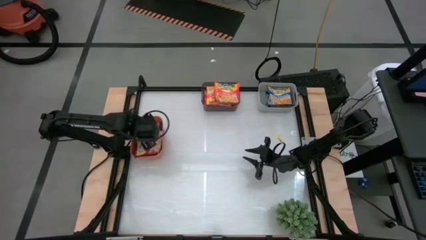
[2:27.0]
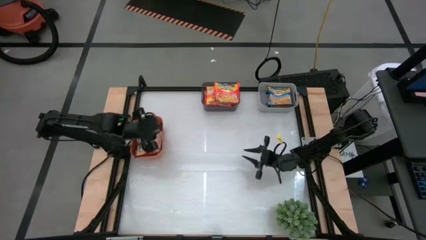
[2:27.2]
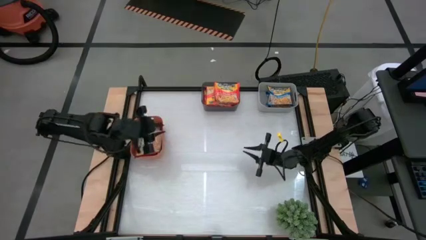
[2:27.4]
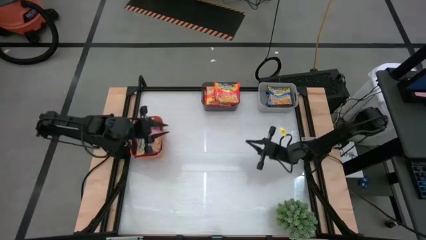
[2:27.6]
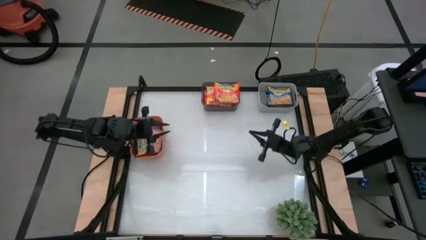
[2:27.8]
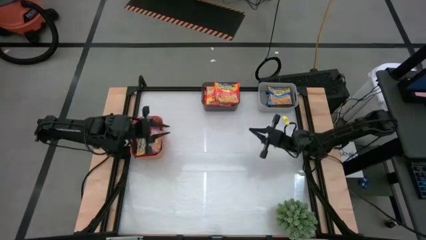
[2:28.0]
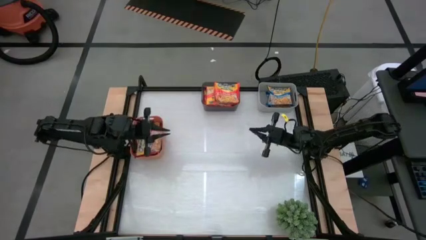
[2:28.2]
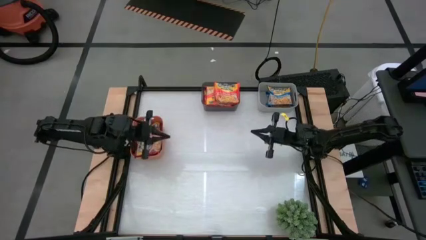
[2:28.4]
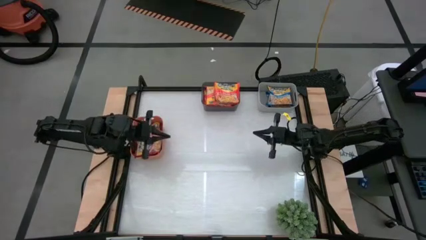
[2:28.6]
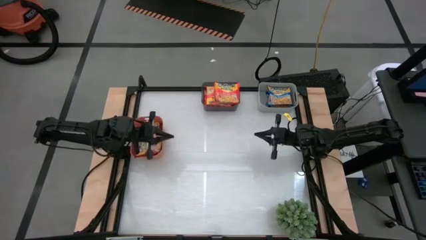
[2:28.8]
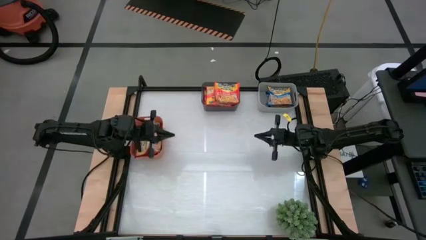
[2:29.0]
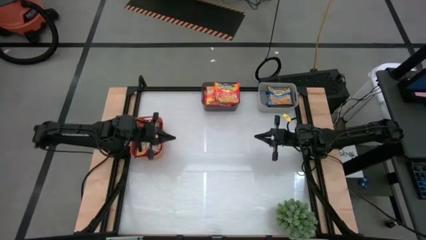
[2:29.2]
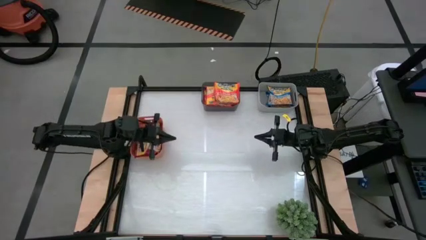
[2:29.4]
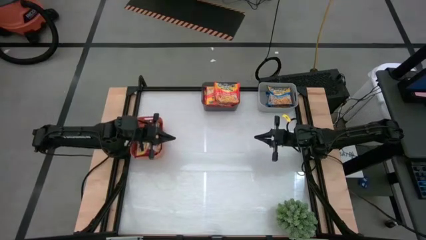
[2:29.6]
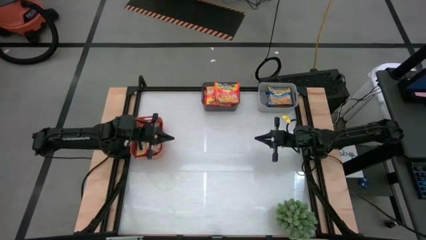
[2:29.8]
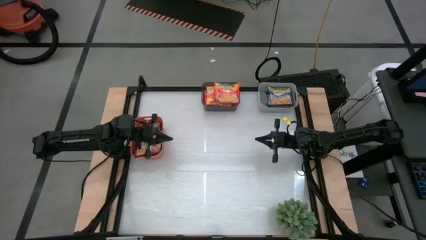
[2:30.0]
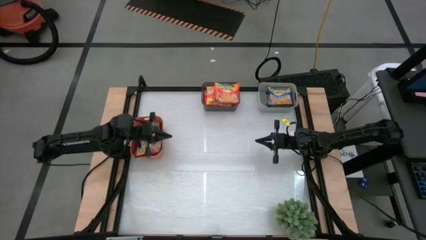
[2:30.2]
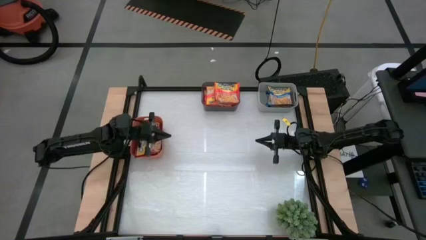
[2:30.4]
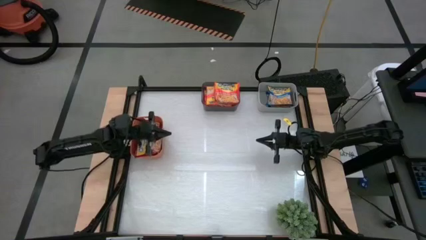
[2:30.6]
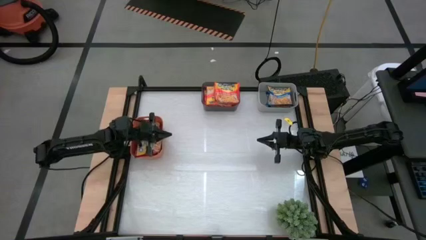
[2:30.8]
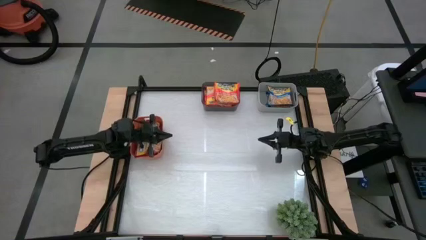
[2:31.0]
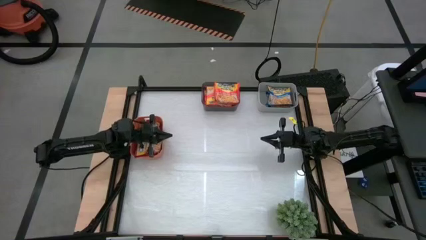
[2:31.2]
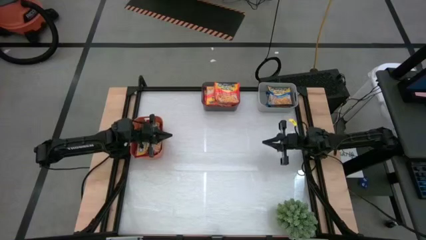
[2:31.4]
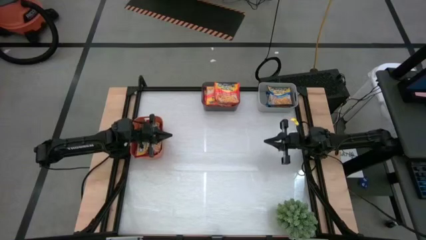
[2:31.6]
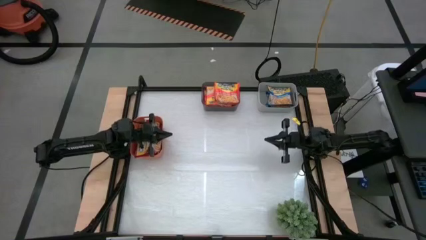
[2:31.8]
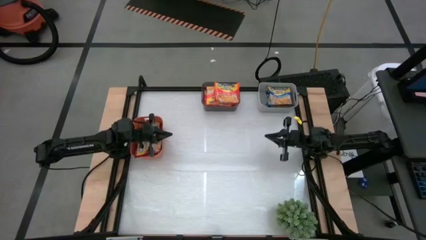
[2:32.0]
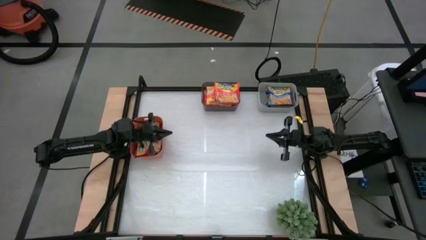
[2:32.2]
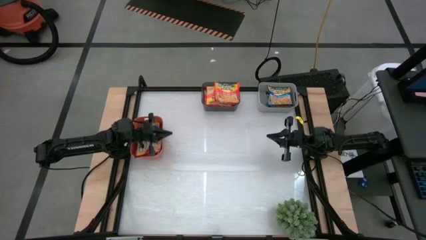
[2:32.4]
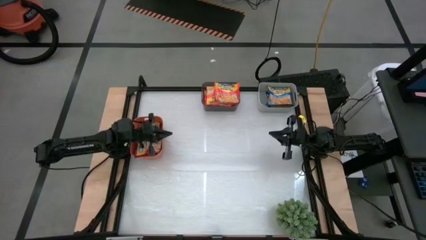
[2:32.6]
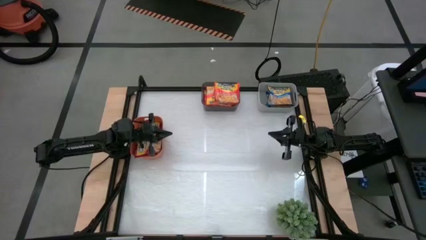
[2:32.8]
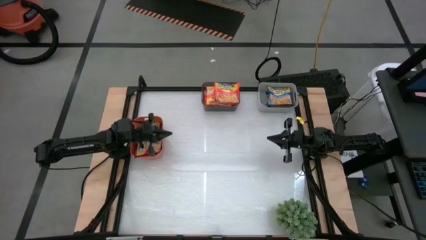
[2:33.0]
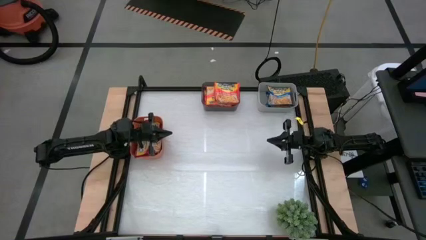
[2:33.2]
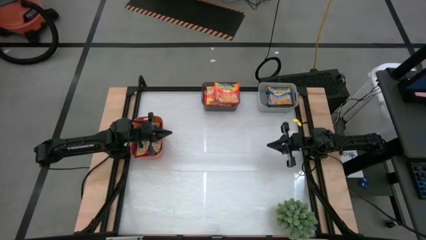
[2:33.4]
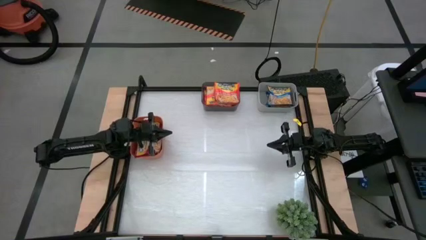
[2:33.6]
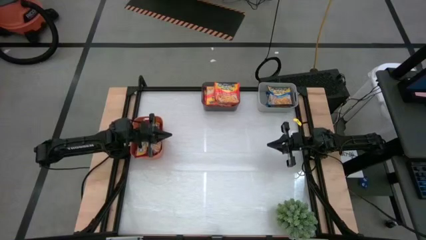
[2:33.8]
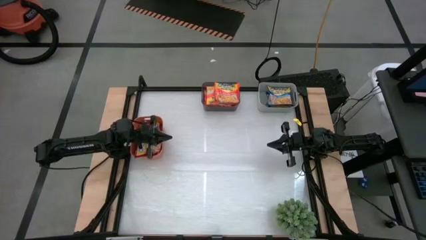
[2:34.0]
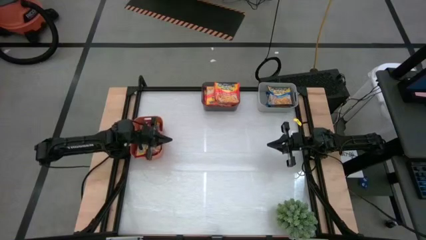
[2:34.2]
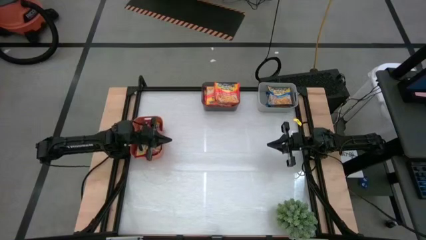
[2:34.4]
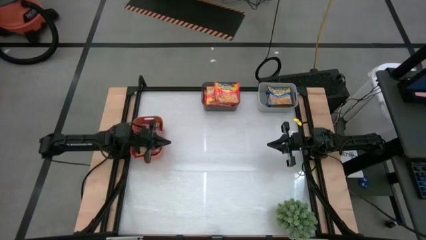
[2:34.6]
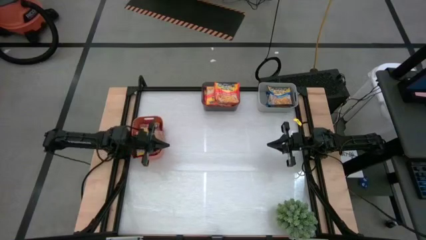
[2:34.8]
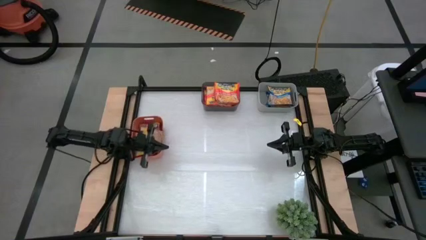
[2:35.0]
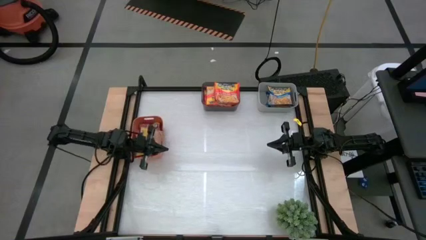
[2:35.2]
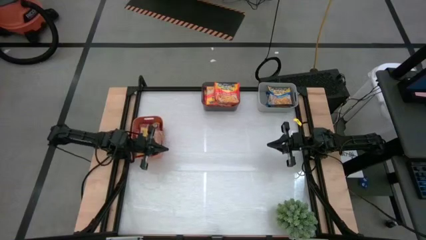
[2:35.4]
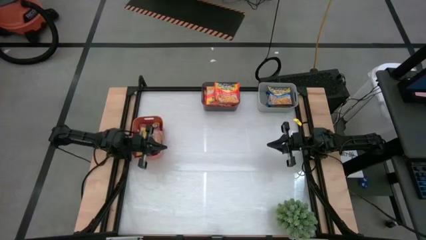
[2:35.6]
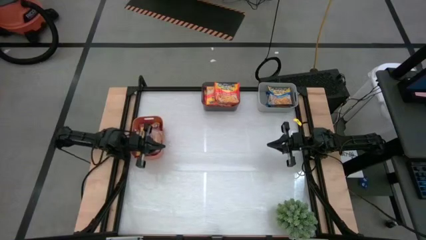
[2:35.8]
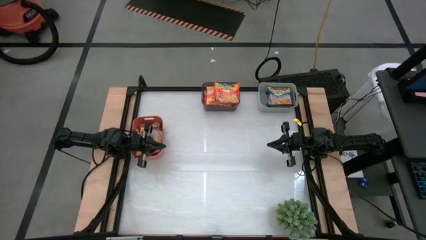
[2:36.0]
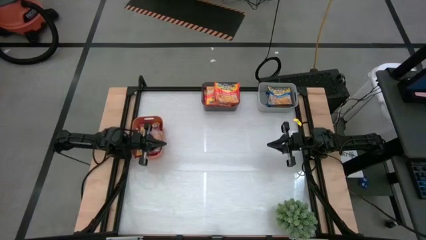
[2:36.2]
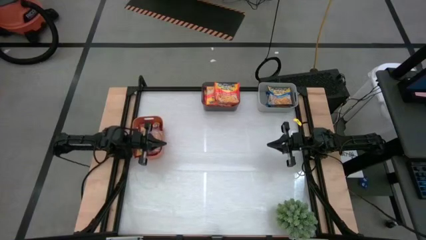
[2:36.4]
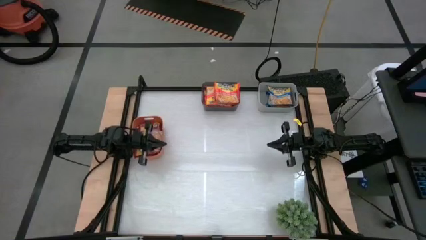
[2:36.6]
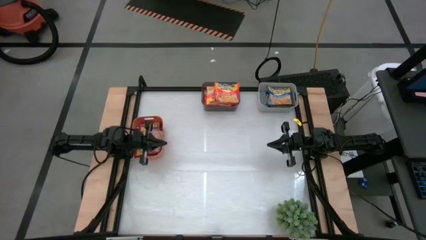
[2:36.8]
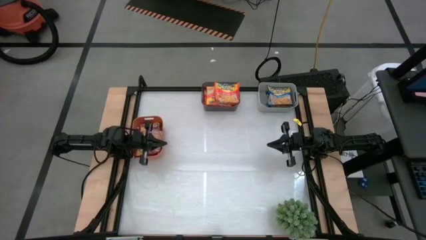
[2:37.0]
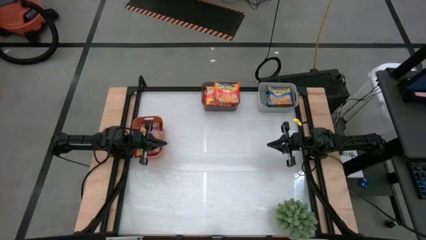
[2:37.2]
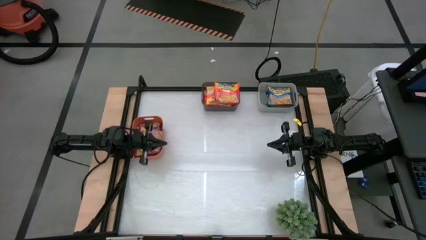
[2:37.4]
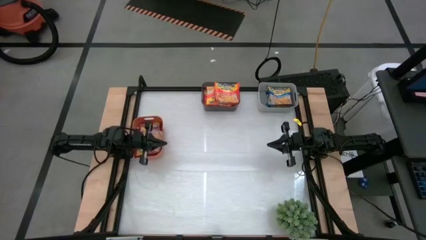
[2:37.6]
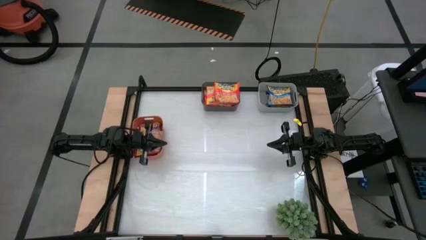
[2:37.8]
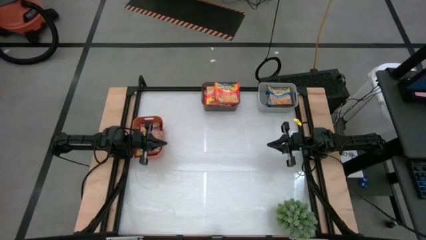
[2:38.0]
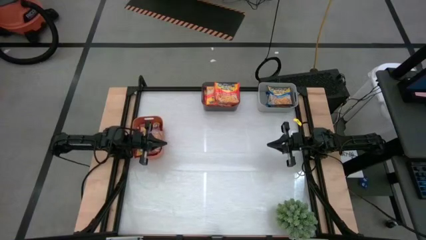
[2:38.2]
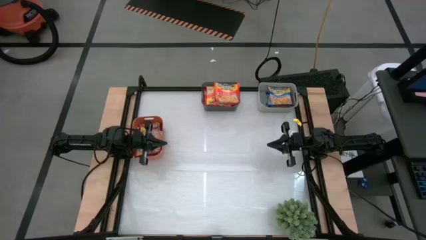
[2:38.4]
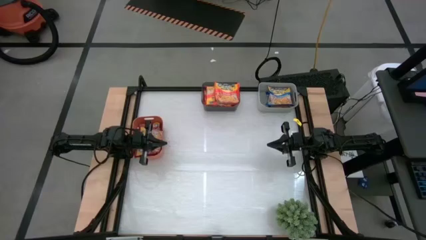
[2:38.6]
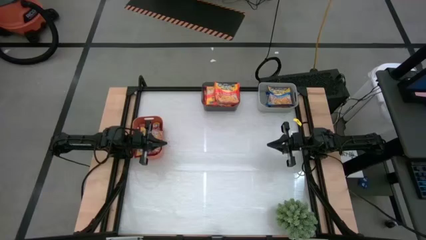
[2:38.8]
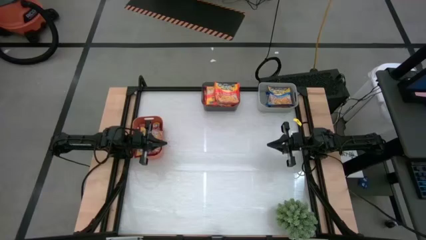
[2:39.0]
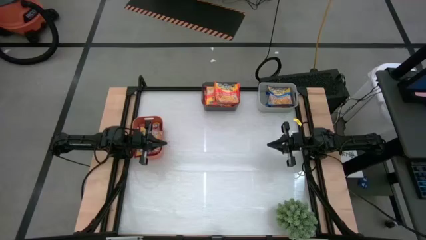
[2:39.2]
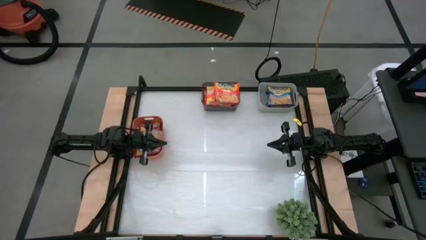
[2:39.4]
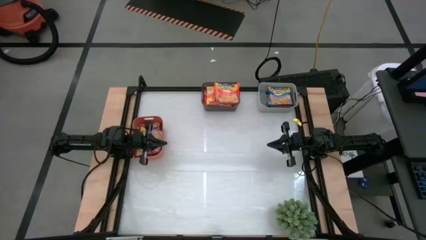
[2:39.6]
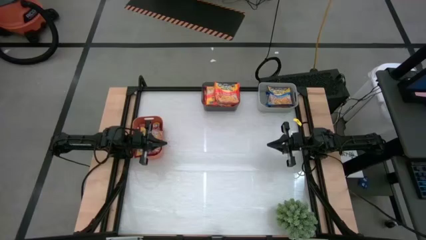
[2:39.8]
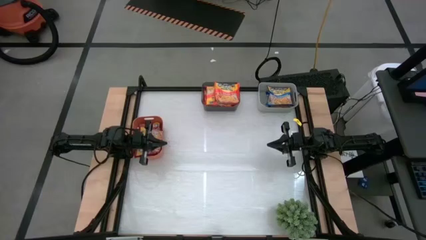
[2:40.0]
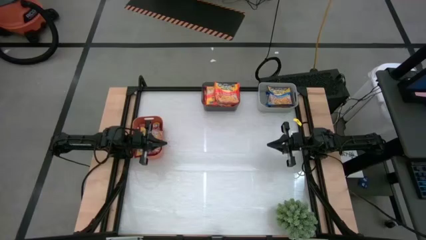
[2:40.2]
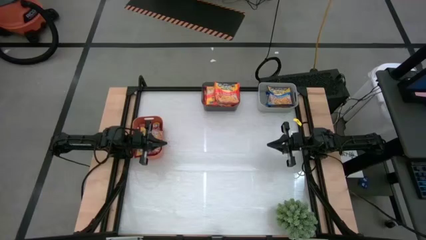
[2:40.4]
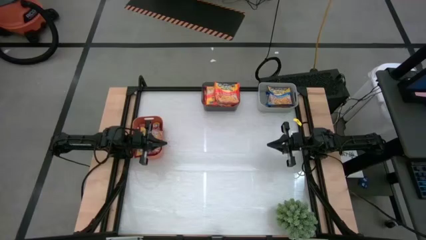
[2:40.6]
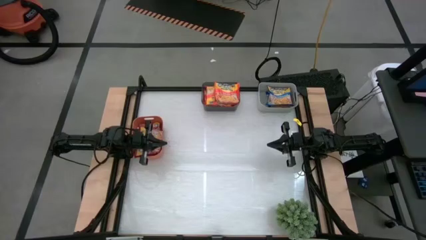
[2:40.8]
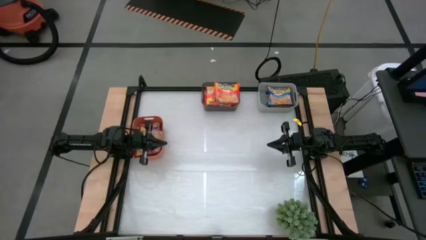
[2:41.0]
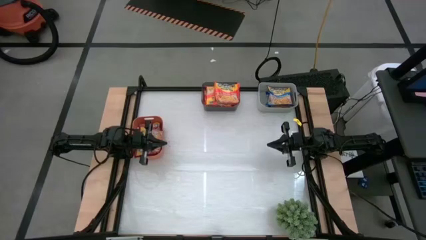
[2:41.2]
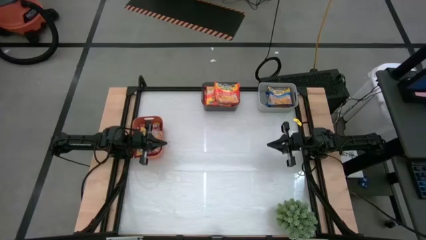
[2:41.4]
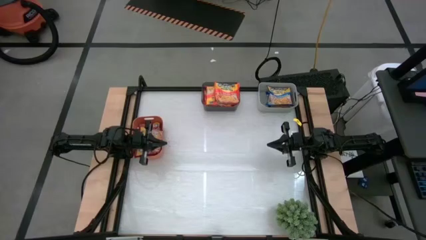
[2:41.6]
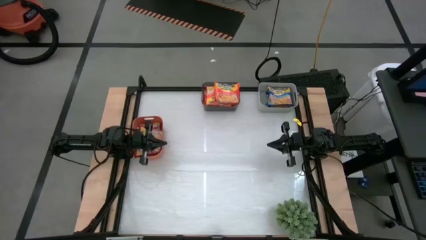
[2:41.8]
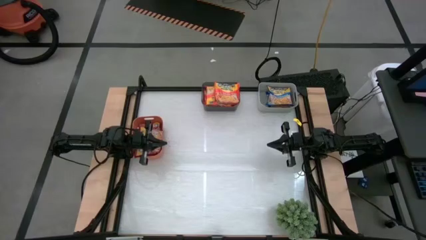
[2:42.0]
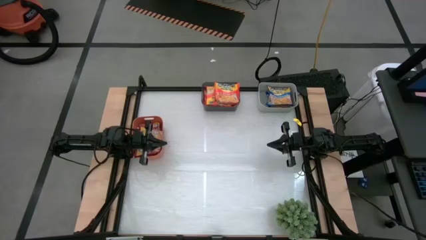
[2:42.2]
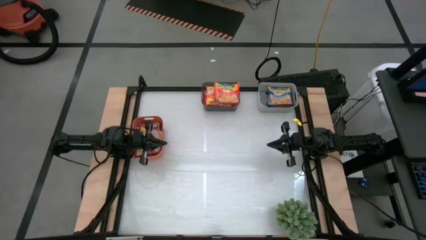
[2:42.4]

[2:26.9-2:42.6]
Task: Sort Maruchan noodles
Return to Home Position

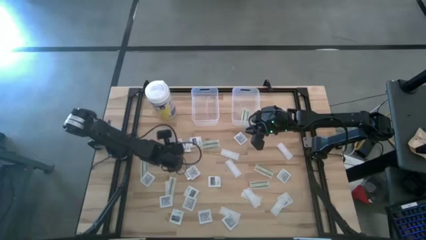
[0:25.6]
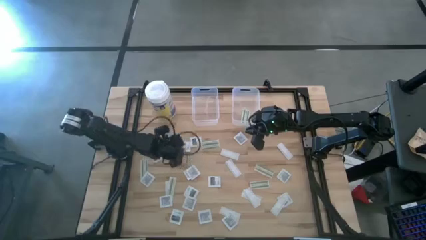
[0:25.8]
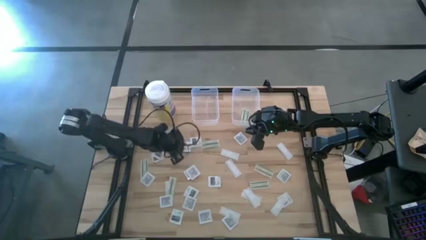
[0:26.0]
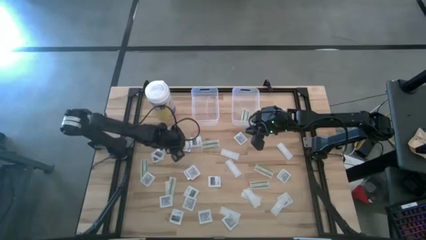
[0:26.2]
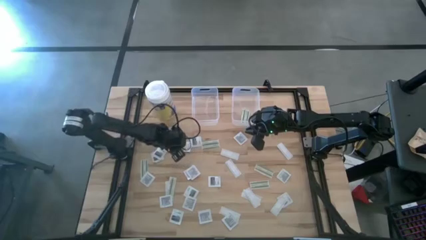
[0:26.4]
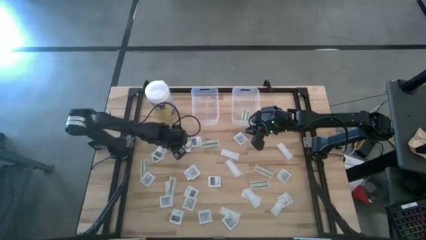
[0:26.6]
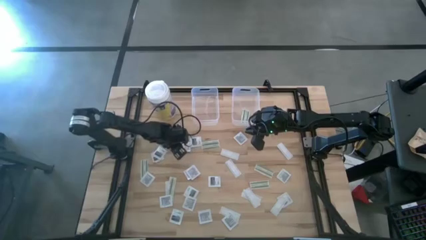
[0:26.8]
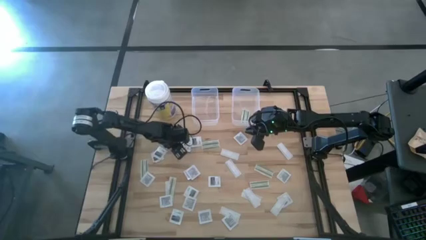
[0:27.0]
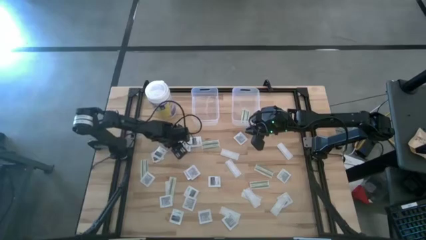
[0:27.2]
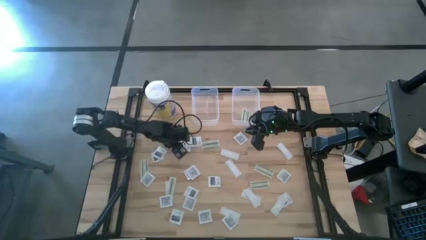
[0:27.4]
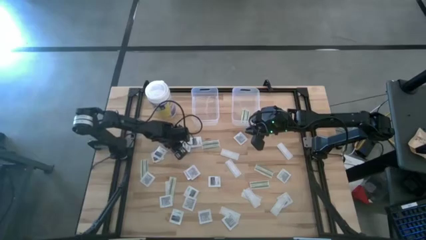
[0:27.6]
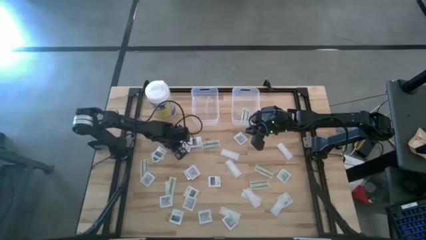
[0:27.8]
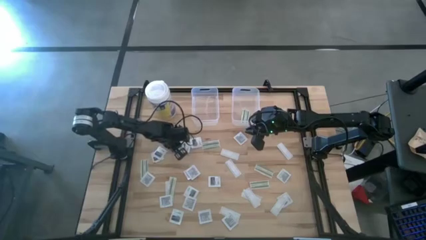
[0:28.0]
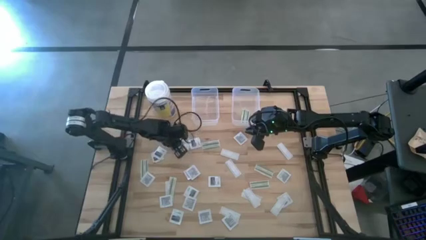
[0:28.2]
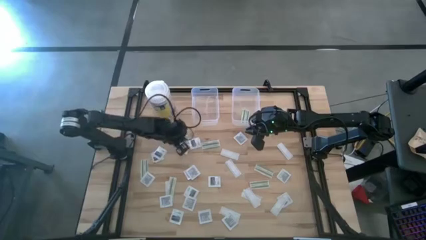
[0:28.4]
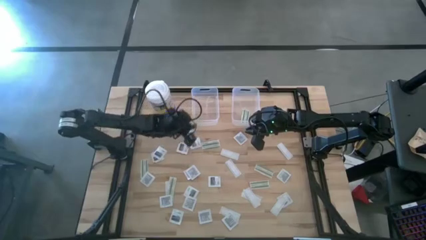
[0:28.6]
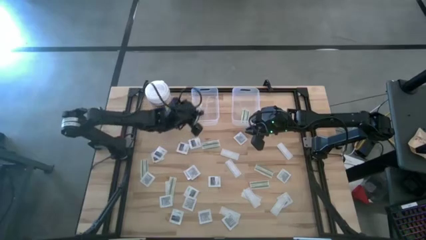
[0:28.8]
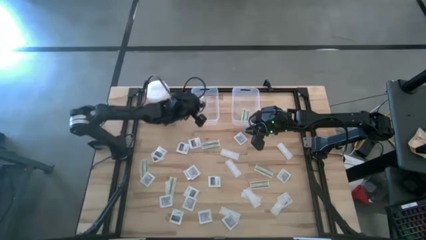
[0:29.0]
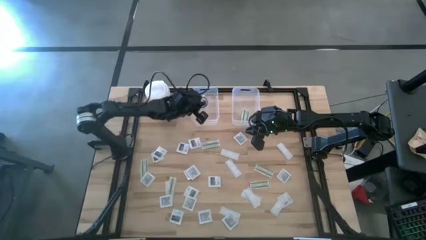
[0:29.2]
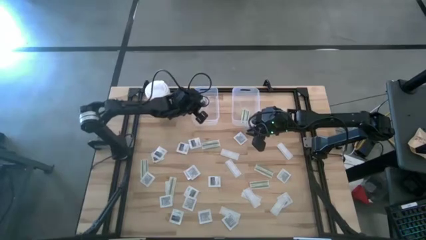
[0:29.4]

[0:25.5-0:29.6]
Task: Pick & Place First Aid Supplies
Put the towelette pack into the left transparent bin
